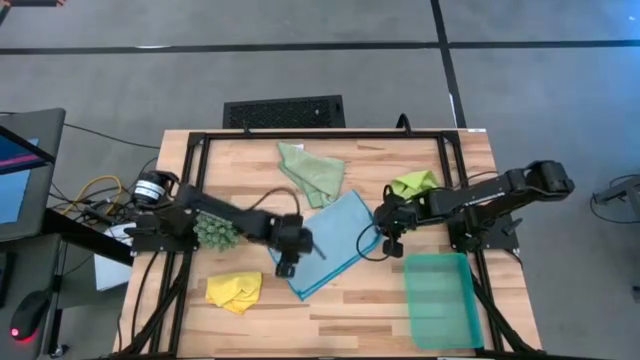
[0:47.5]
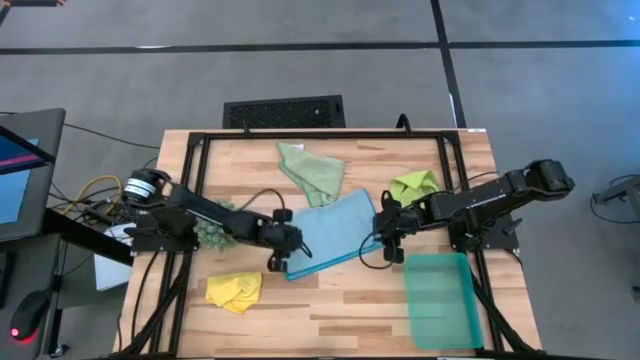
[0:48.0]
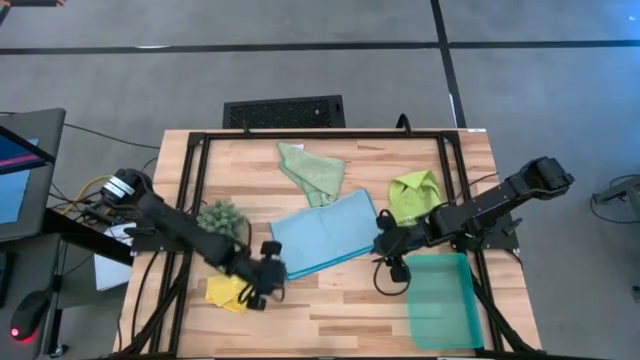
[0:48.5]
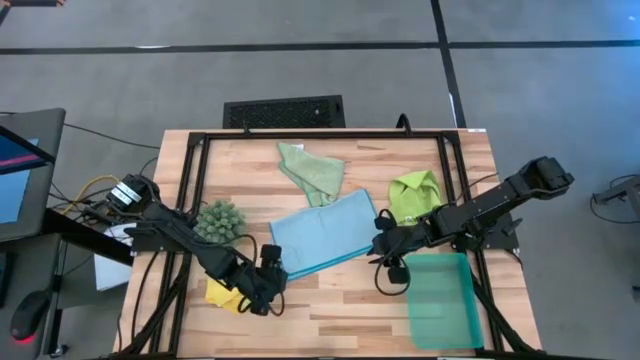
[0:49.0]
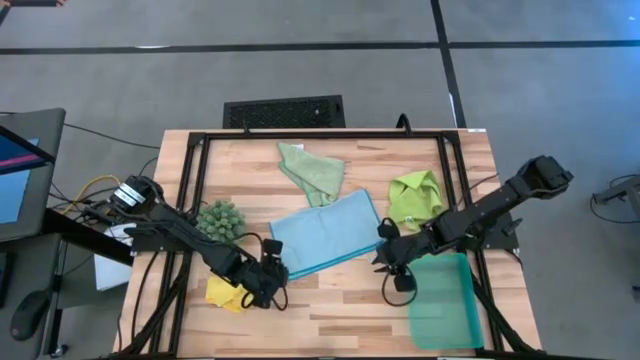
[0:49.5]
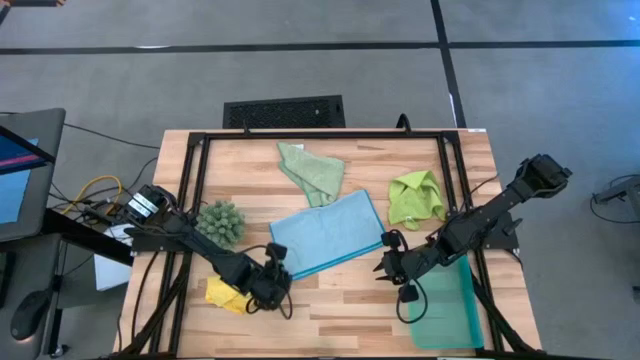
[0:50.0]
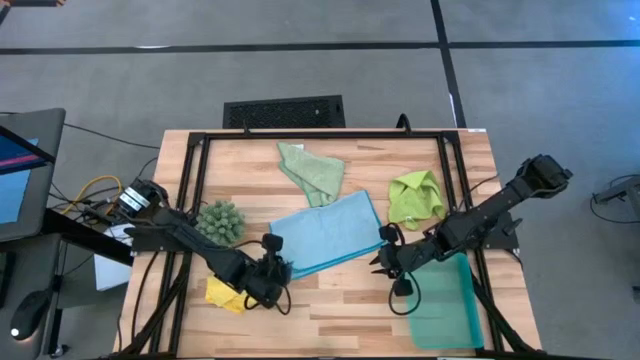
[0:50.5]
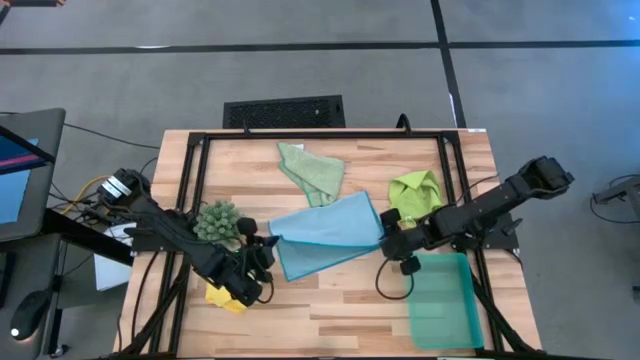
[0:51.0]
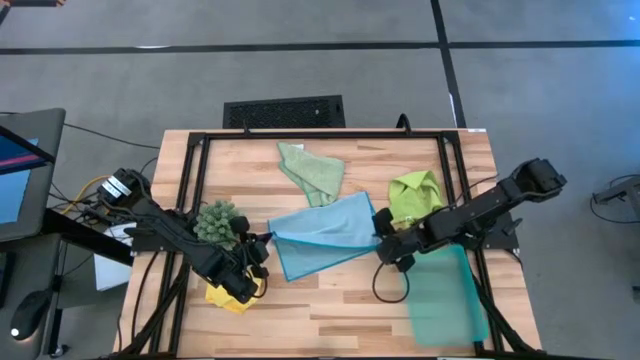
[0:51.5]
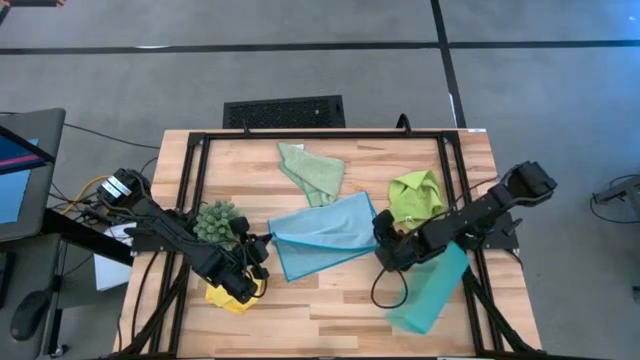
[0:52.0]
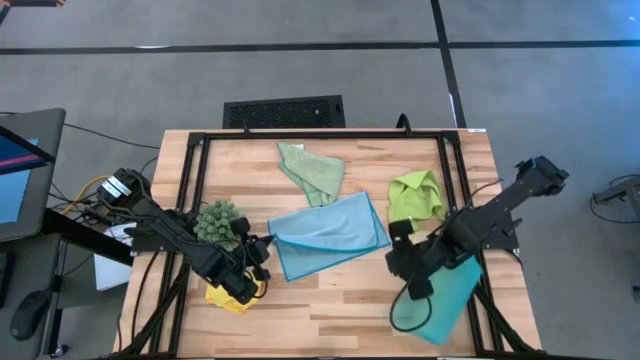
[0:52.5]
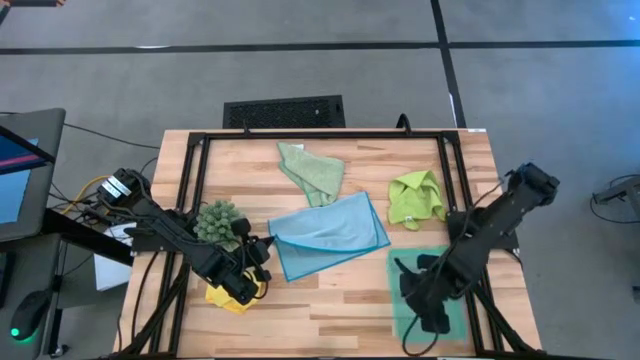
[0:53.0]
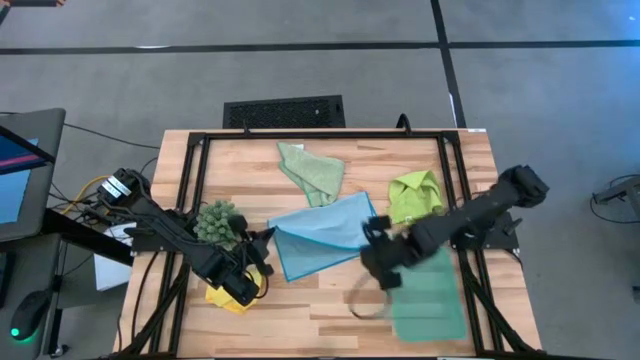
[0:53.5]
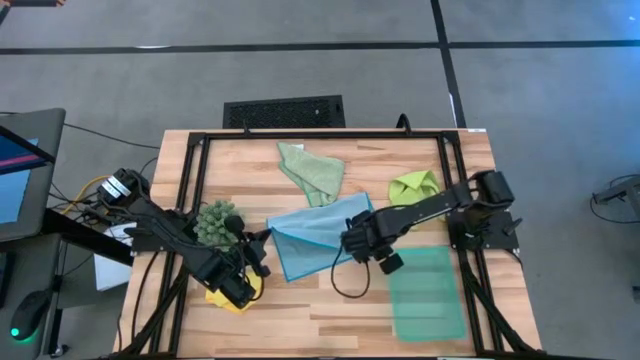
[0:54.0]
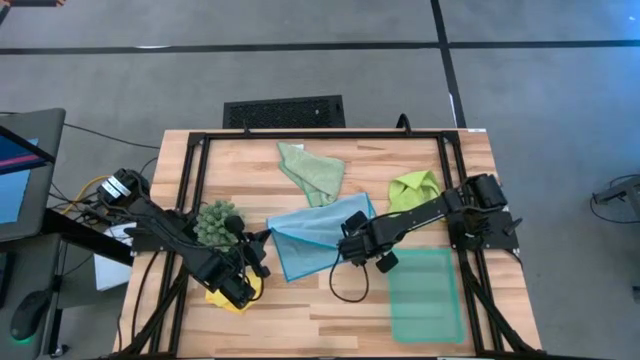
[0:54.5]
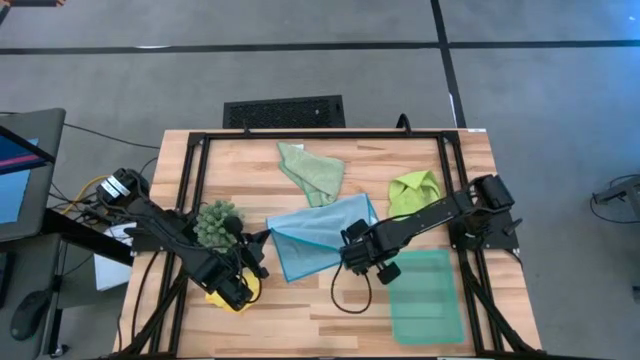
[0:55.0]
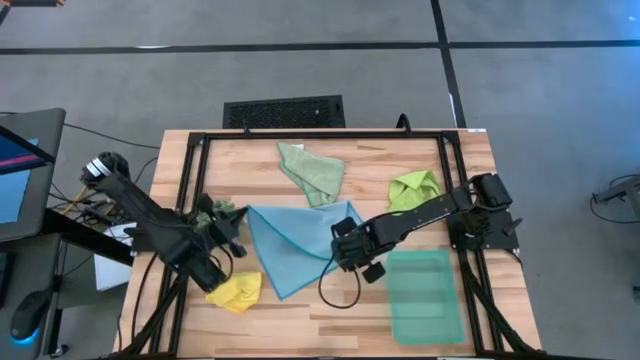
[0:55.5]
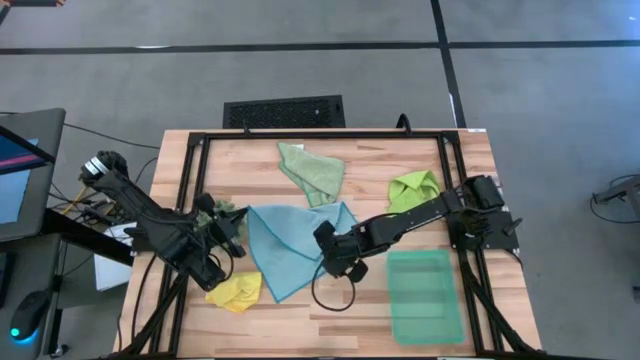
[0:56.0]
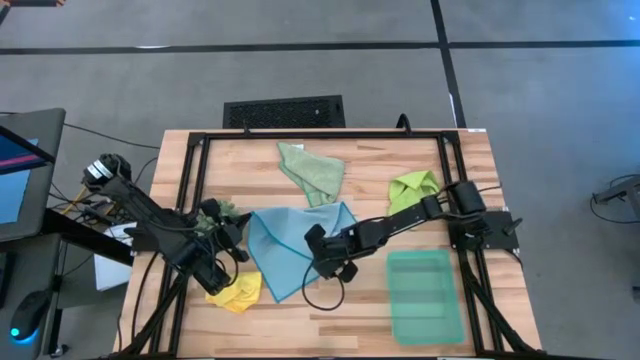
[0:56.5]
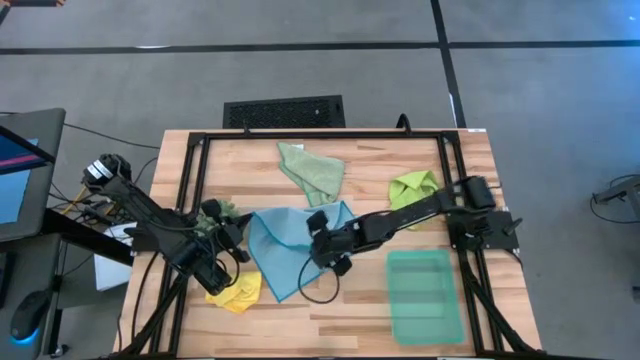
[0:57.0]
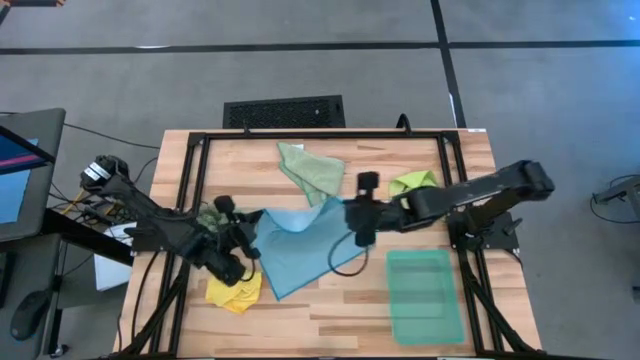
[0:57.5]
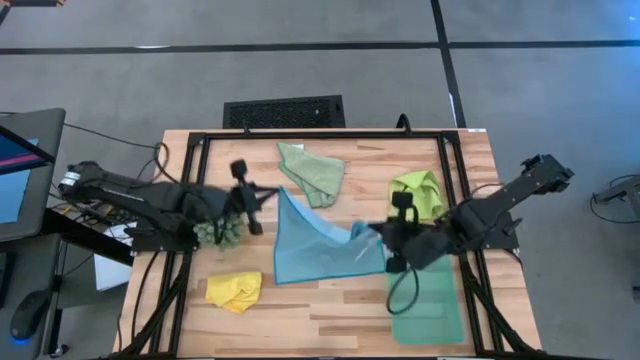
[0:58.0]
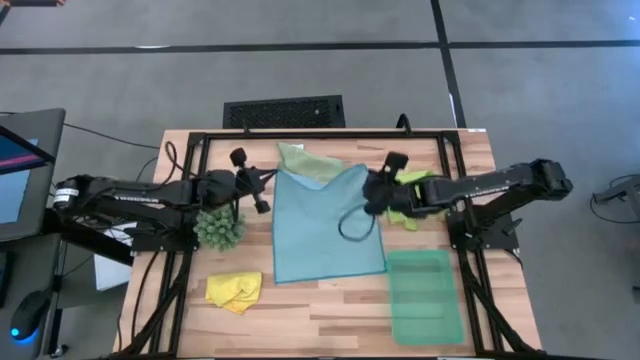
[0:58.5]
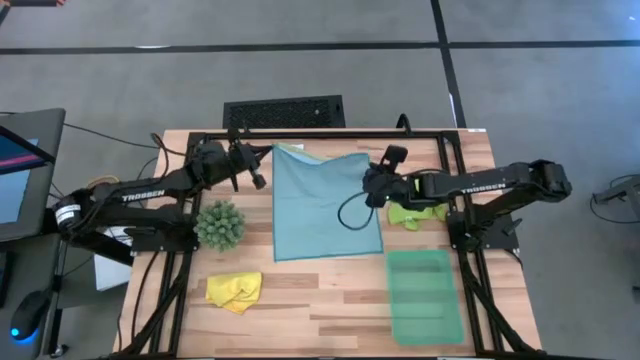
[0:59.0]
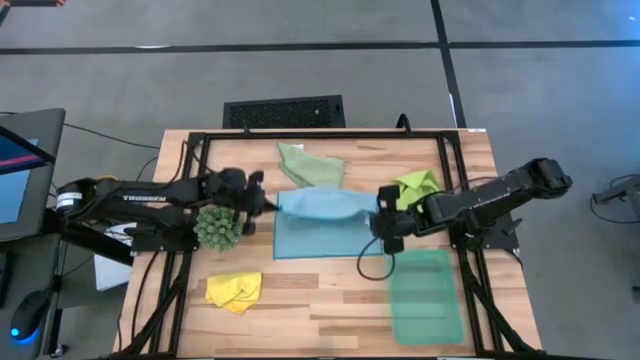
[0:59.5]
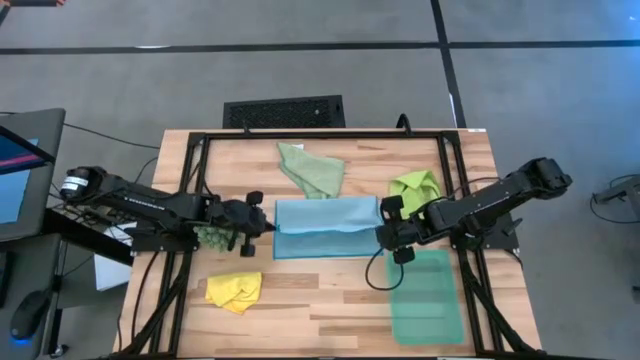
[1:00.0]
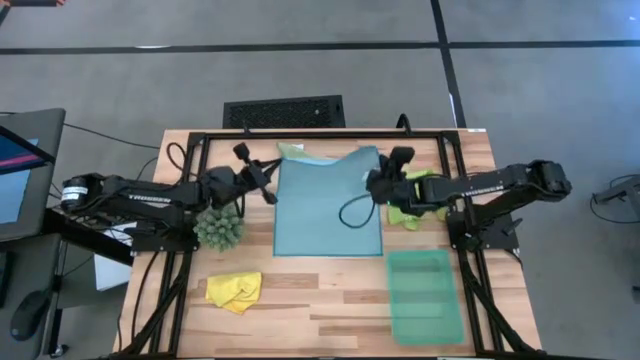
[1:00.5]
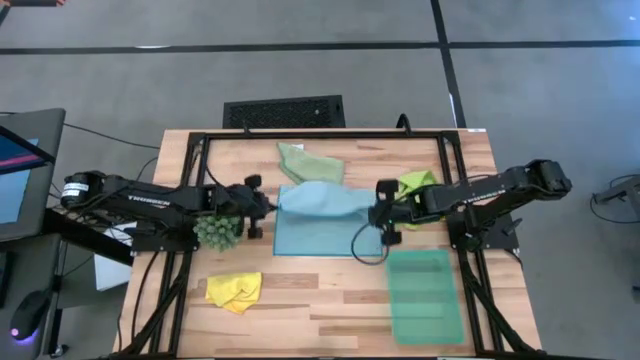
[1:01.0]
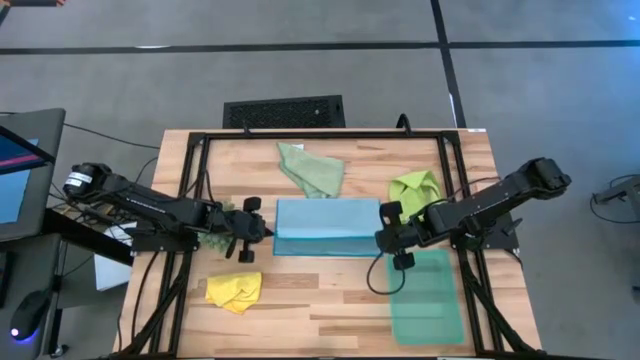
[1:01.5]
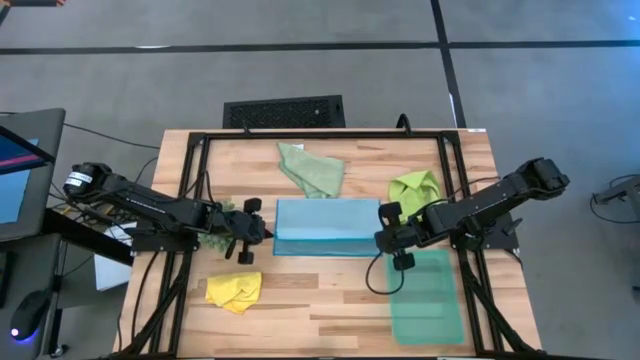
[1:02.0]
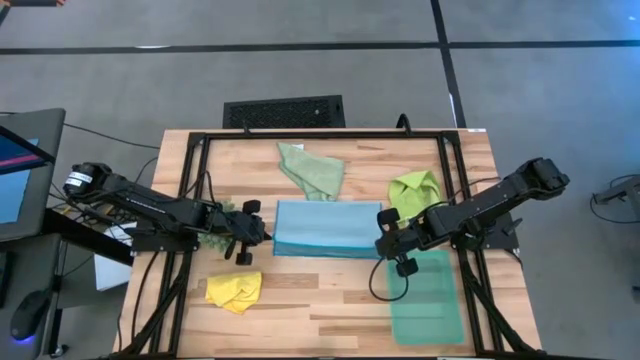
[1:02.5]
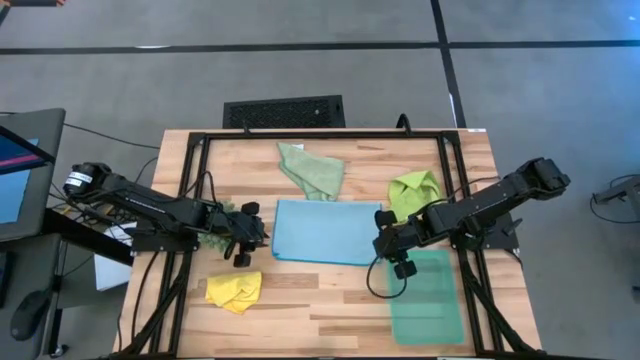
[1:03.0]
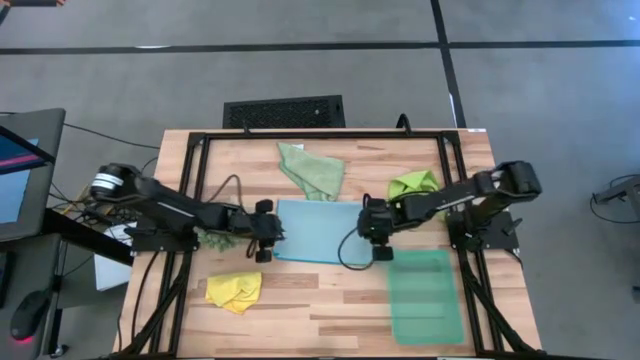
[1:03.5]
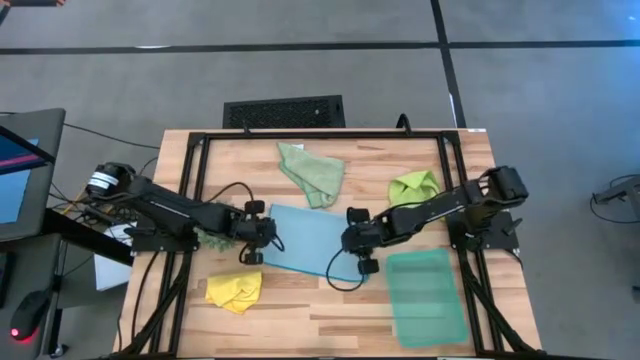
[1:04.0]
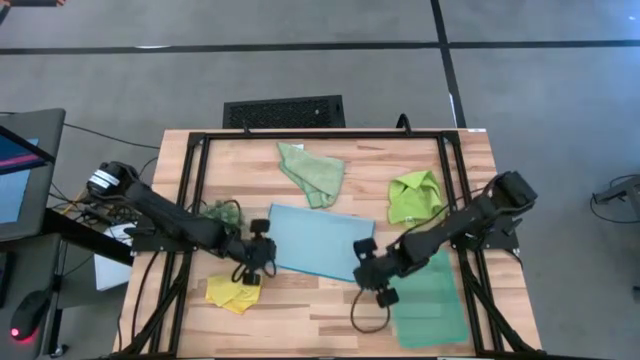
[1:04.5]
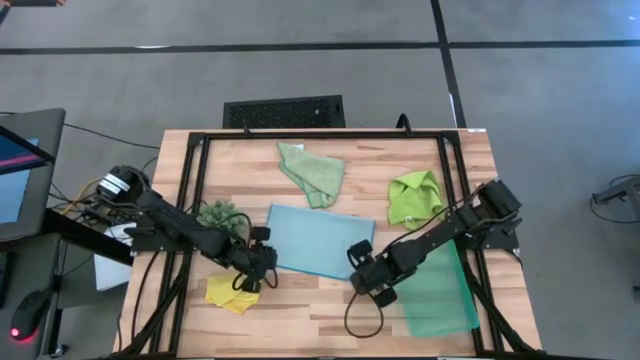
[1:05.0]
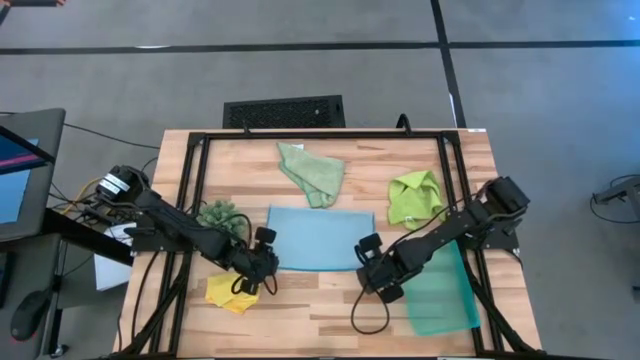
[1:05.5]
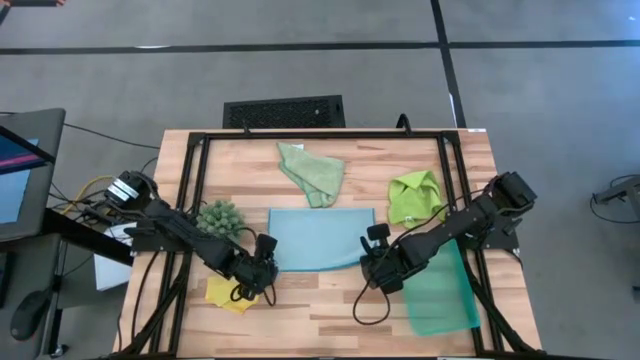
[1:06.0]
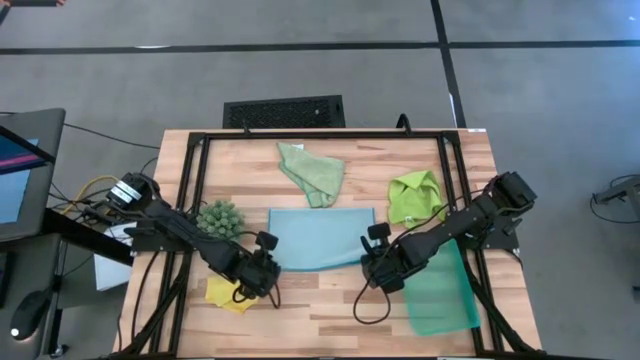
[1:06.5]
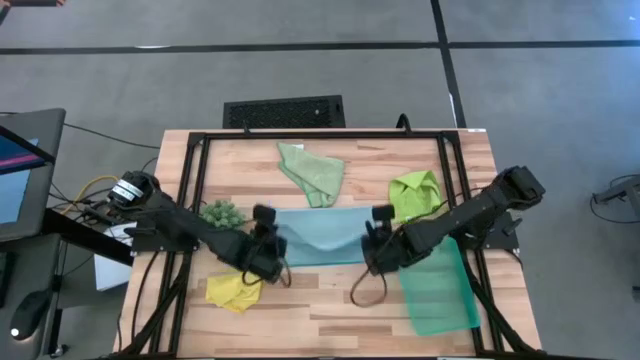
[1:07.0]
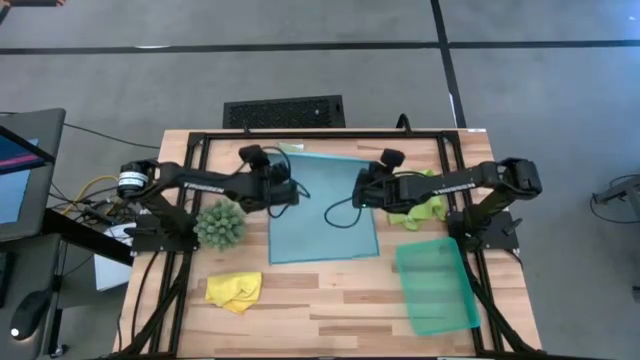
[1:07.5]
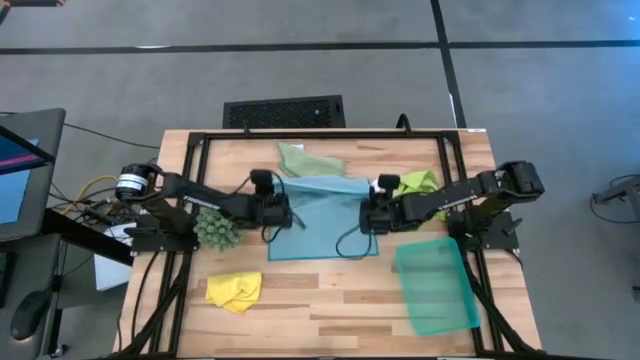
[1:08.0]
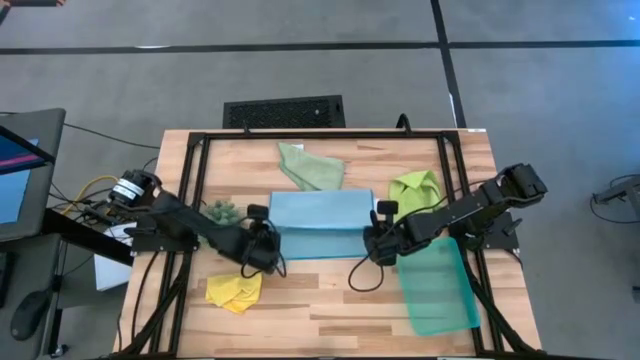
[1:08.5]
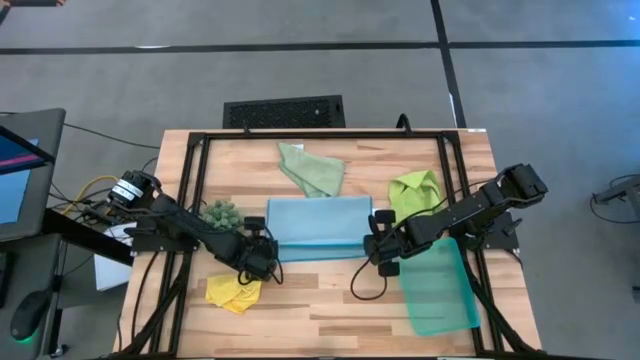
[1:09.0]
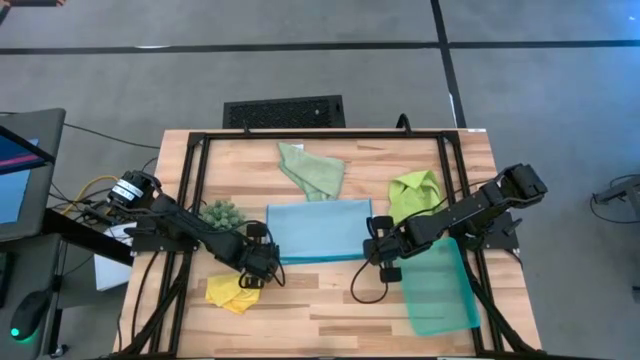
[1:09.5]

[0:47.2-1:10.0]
Task: Fold microfiber towels
Fold the blue microfiber cloth
